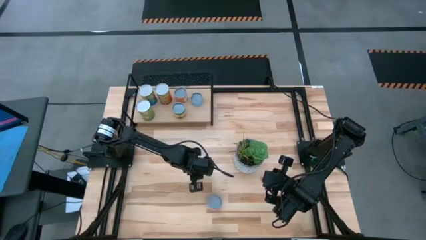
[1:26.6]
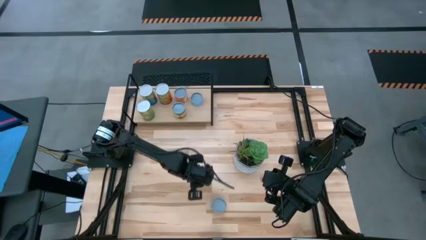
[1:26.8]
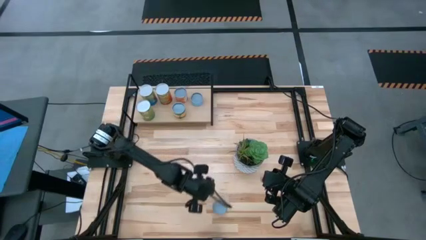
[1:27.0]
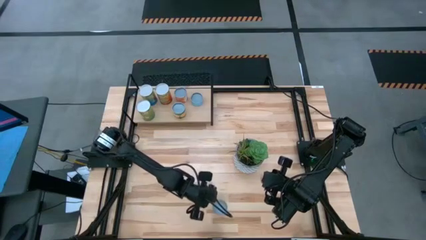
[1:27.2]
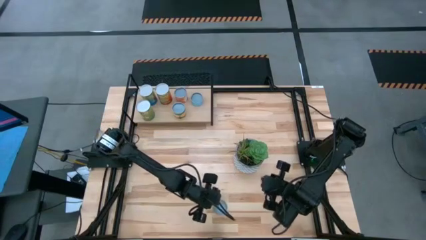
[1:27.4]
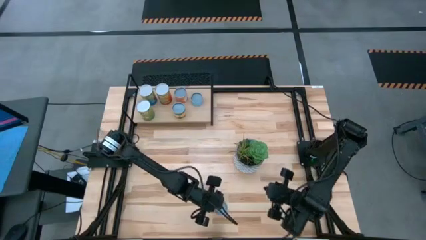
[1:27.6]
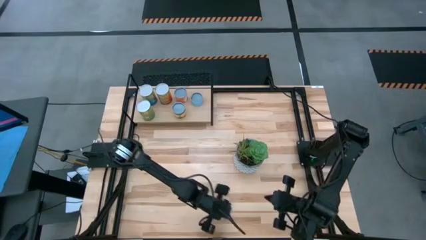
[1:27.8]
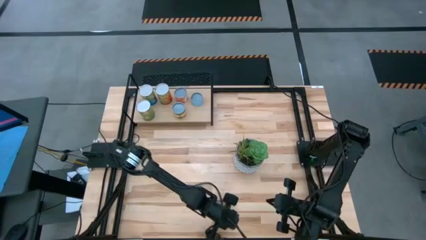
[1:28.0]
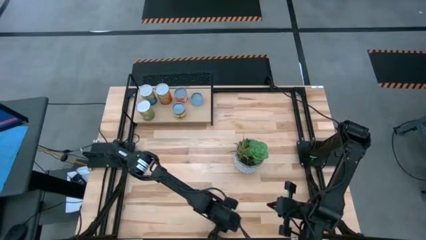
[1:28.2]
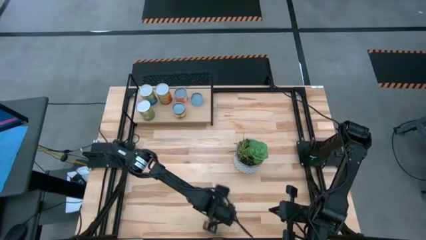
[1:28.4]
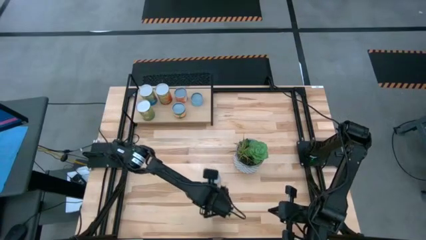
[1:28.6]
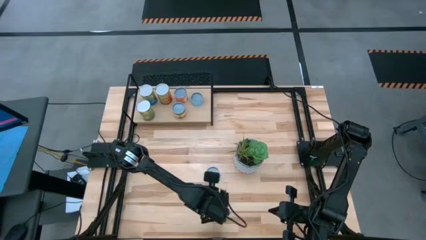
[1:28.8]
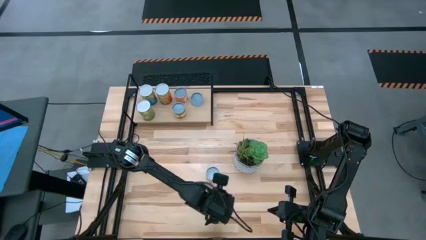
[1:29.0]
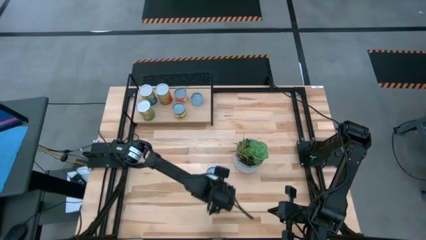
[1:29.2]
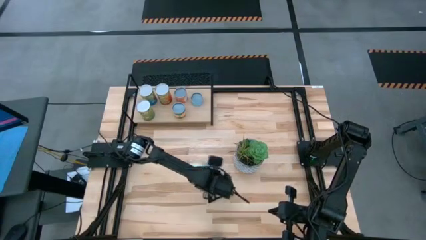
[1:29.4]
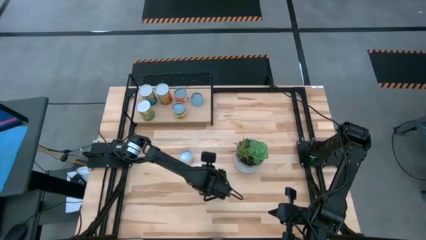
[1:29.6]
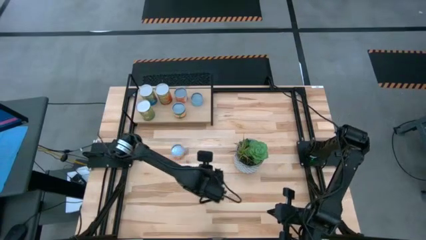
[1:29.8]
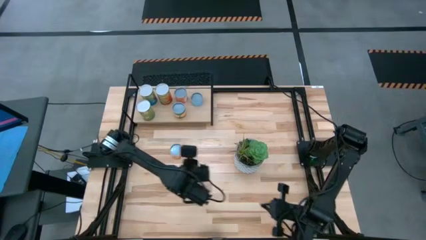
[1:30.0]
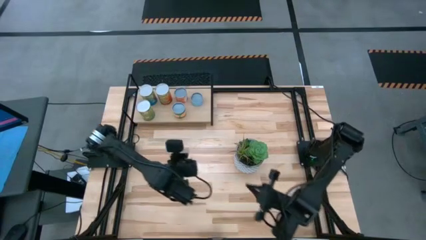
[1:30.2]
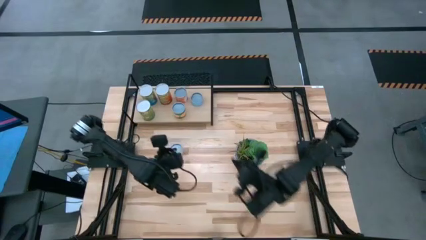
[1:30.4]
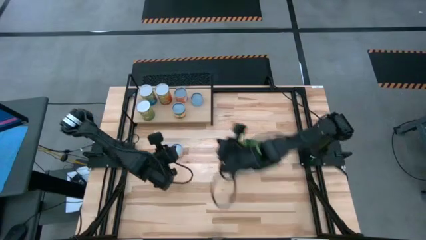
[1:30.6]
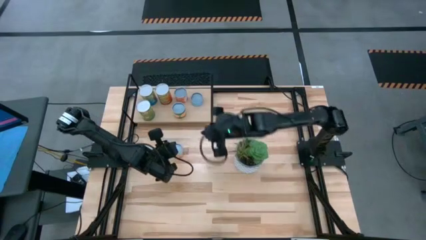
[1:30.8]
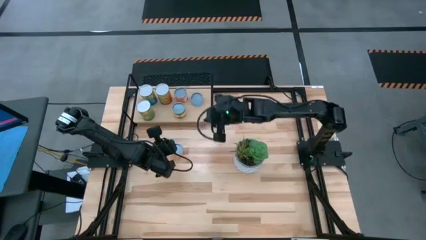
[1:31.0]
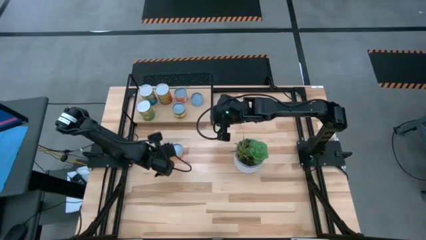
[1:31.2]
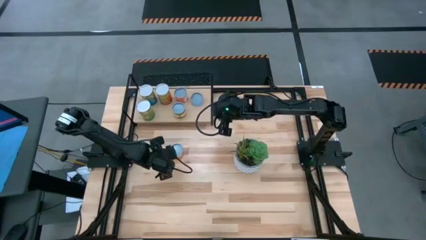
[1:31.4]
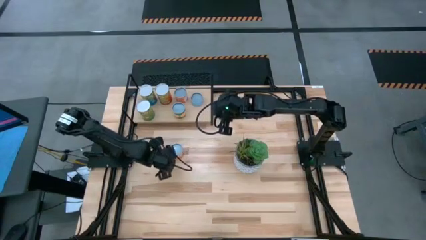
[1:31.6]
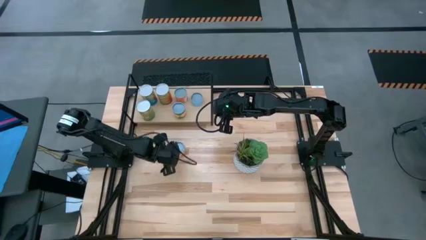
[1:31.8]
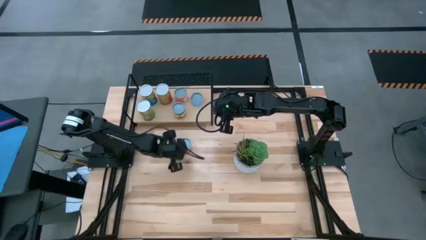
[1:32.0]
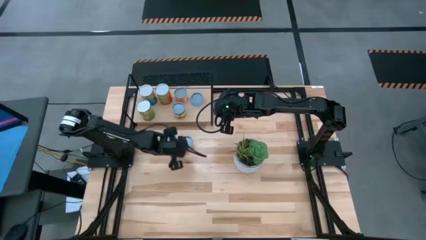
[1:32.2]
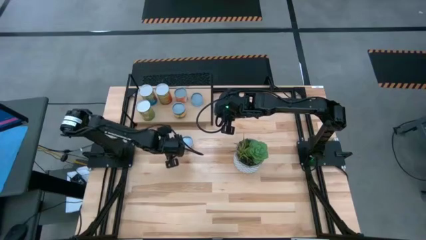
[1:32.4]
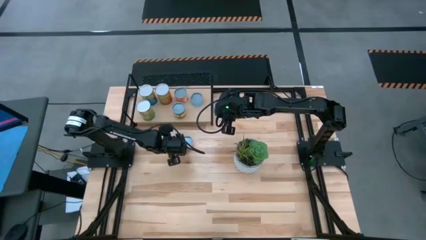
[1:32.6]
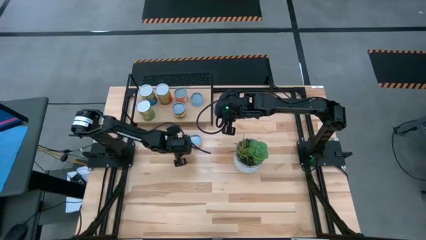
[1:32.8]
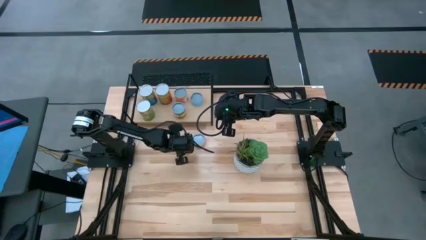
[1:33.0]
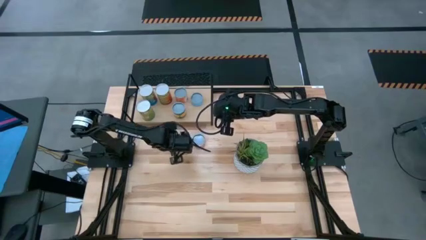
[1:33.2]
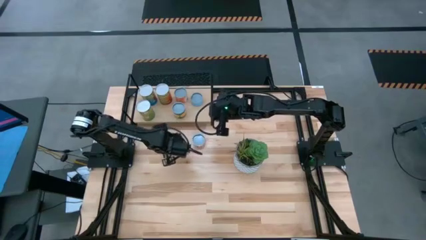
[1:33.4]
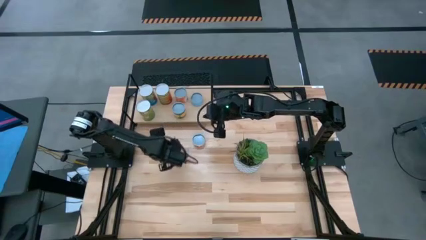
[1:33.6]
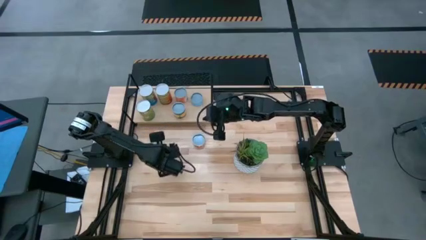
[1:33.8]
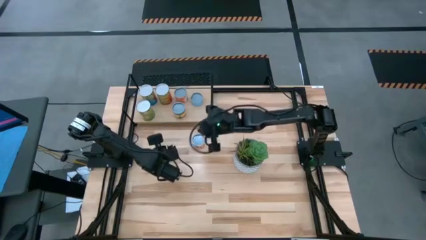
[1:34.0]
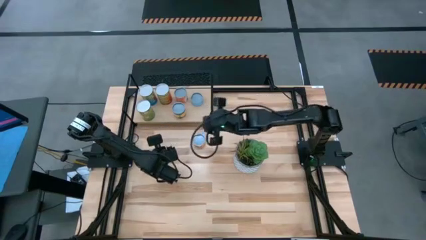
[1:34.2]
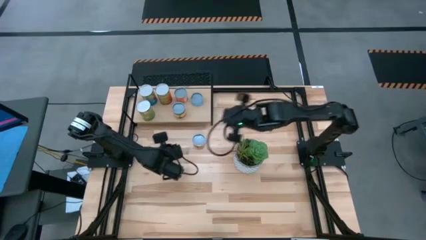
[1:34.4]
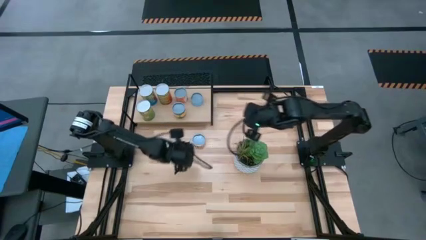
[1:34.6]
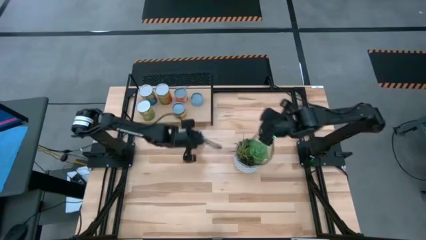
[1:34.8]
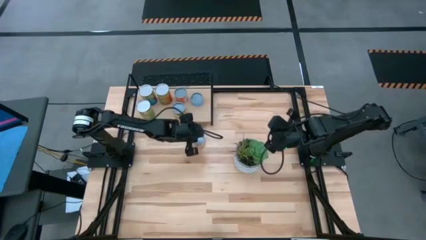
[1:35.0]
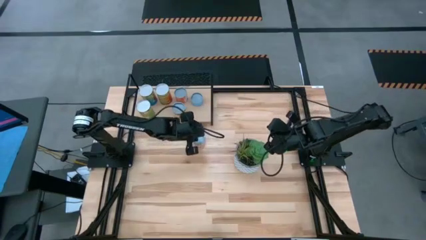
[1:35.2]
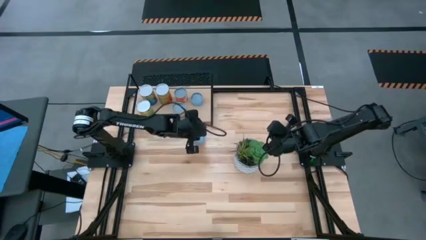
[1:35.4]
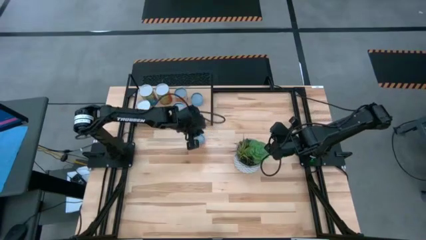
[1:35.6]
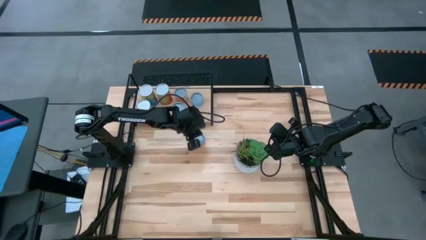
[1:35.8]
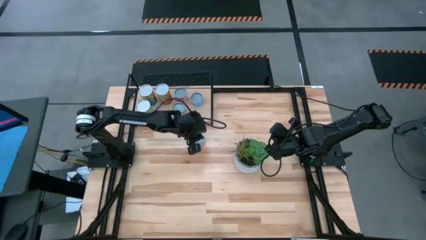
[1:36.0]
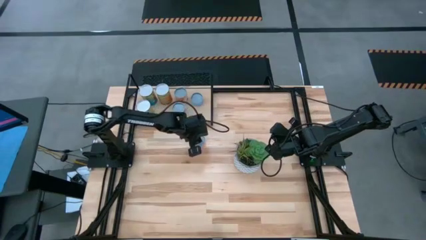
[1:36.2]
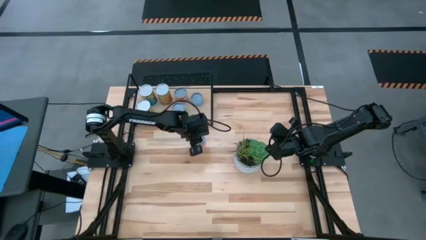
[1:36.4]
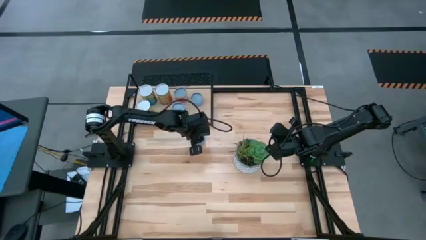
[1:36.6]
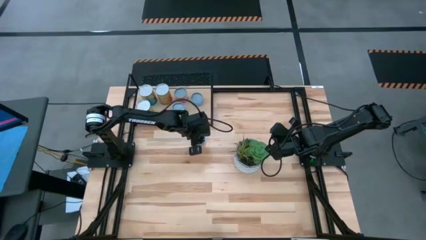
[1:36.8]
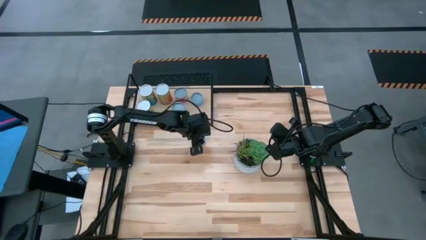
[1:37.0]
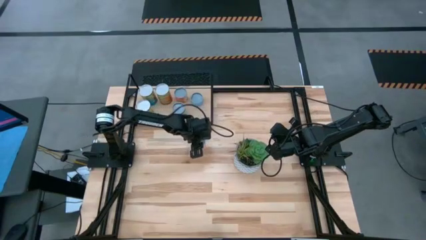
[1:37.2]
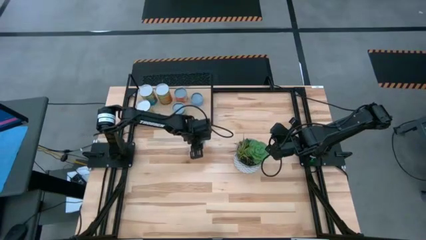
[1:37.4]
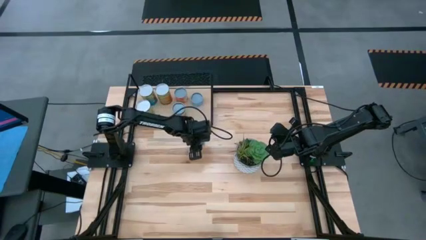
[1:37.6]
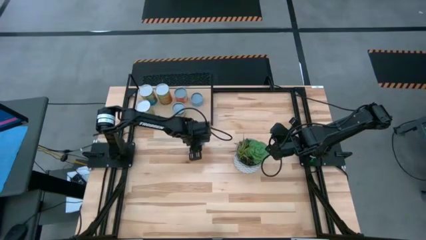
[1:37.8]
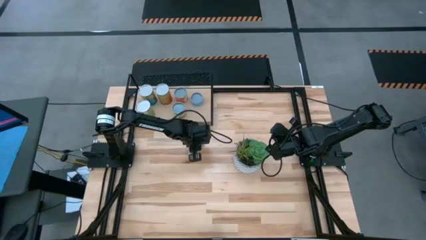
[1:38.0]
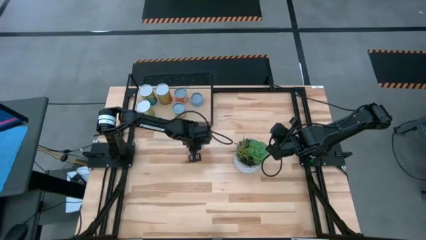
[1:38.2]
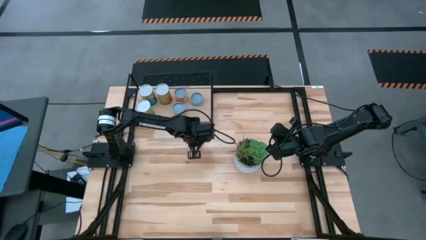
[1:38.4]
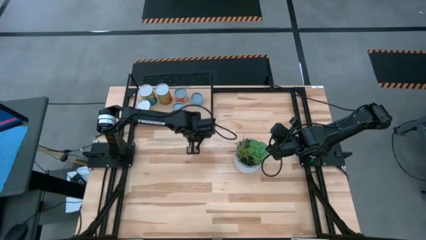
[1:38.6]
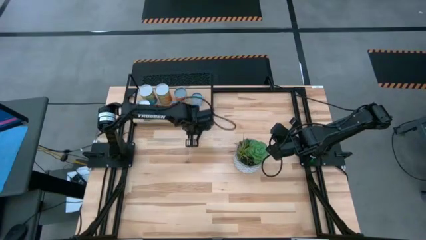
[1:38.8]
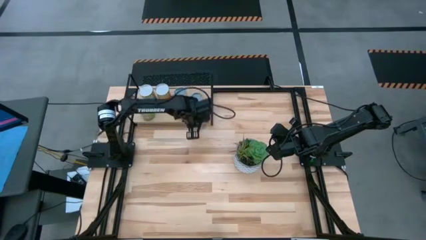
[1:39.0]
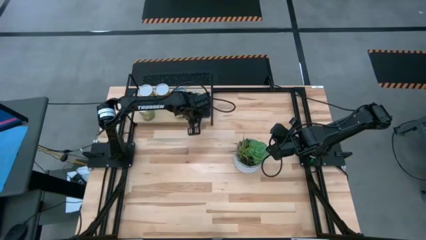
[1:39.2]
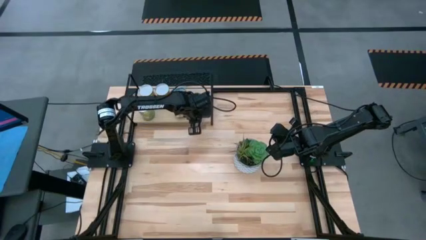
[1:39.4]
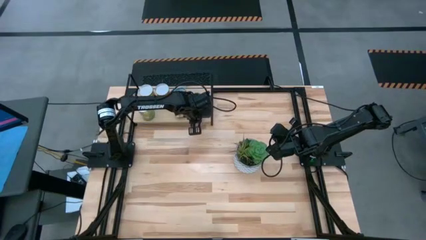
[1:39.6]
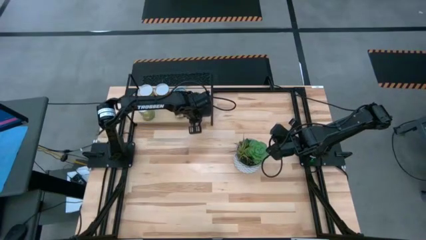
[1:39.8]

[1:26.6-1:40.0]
Task: Pick and place cans onto a shelf
Put the canned pineapples on the shelf

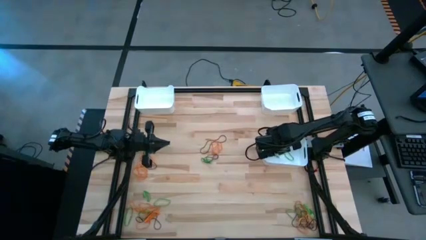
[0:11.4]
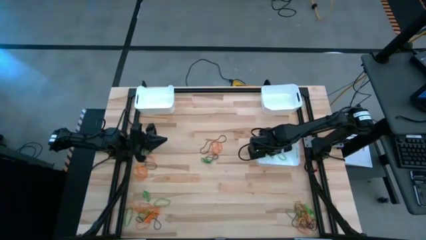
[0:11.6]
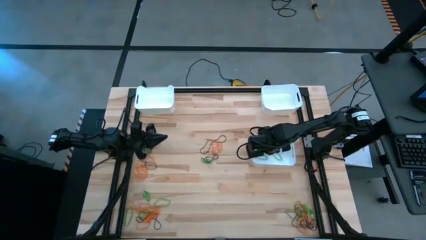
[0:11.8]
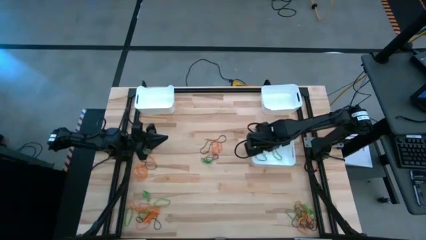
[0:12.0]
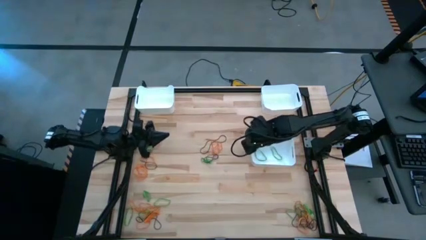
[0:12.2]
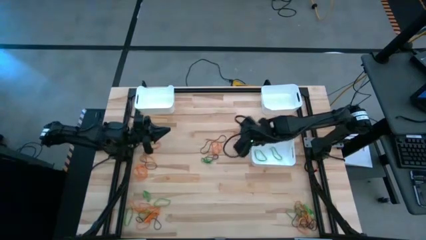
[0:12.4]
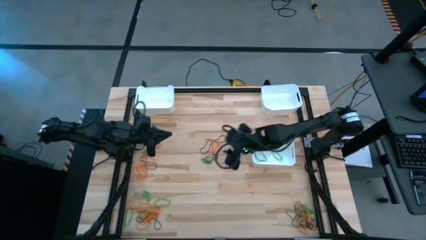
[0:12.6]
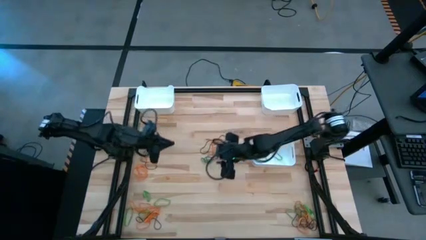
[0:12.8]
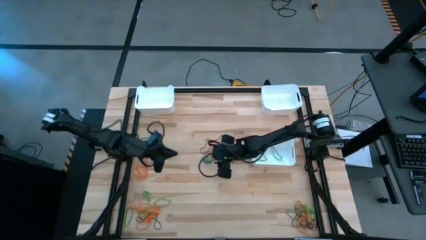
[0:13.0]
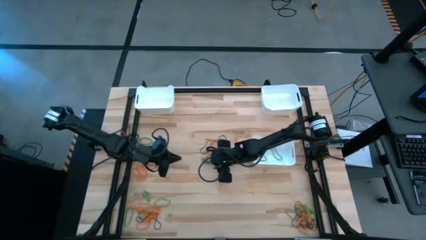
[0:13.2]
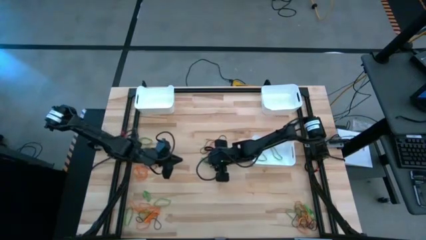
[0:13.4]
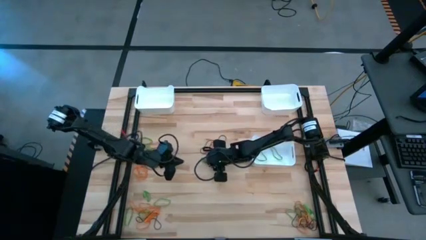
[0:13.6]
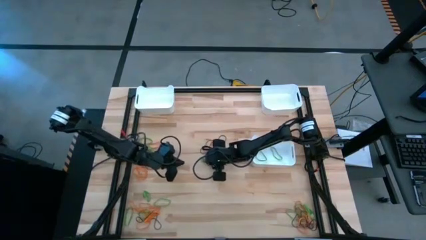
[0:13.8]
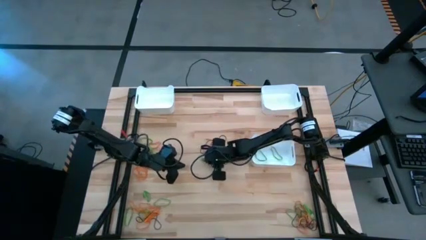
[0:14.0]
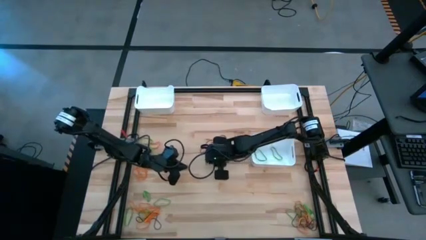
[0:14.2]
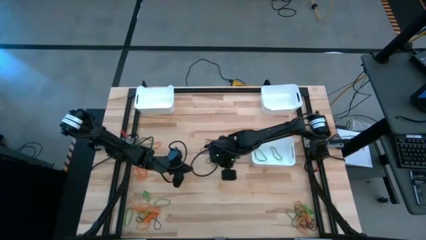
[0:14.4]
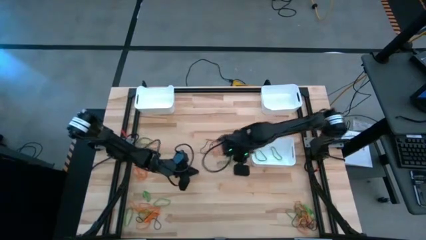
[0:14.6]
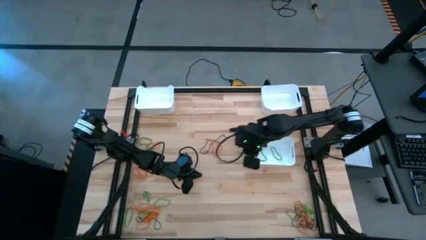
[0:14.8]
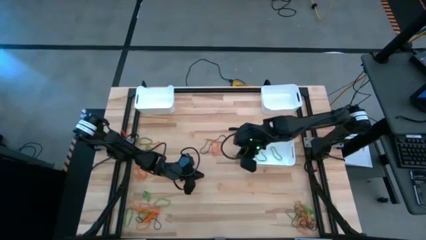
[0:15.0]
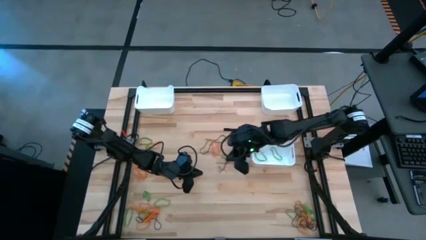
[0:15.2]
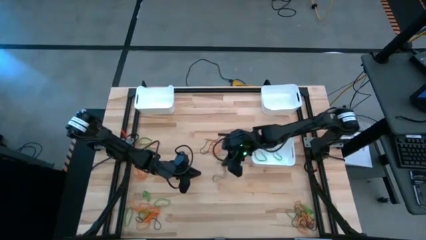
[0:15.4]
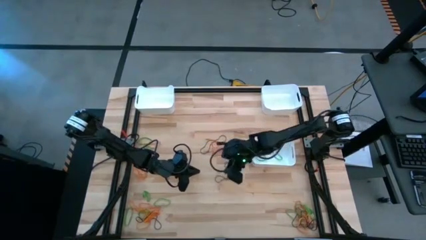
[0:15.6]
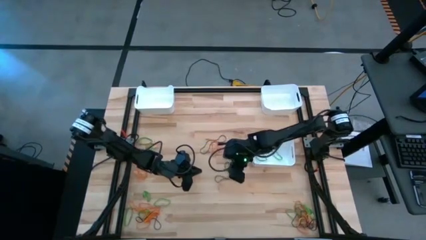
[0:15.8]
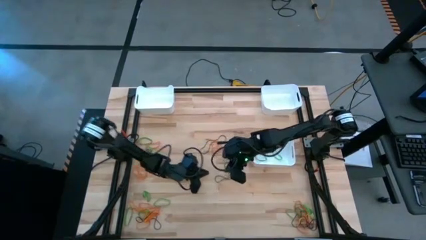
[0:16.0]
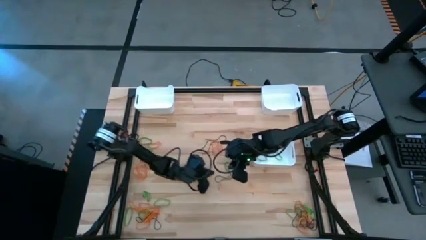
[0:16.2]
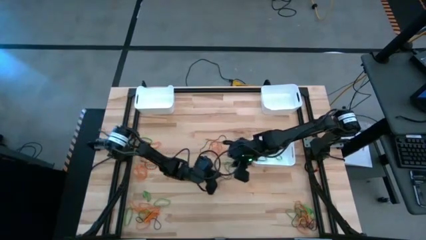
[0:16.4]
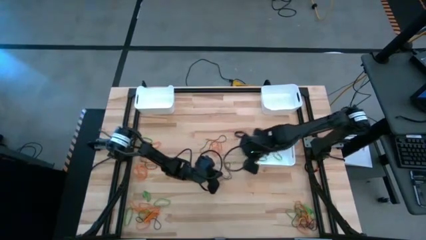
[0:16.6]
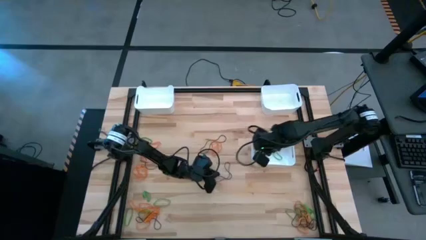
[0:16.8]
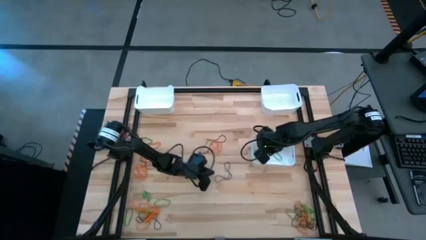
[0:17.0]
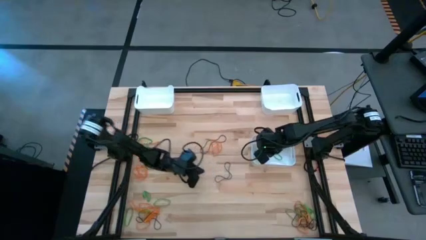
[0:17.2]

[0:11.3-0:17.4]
Task: Sort rubber bands into baskets
Put the green rubber band into the bottom white bin
